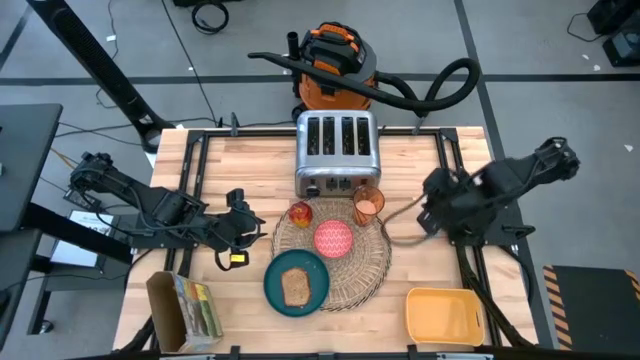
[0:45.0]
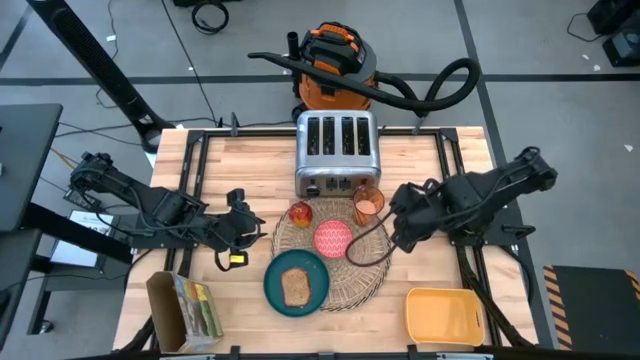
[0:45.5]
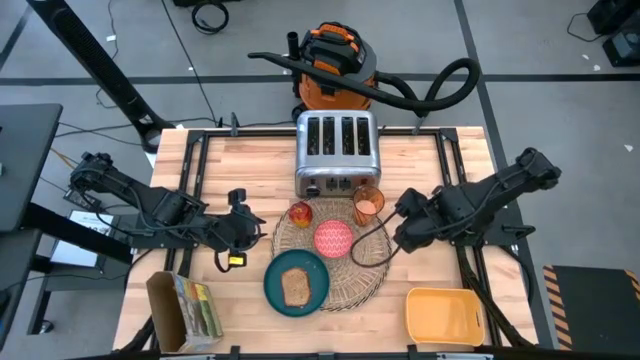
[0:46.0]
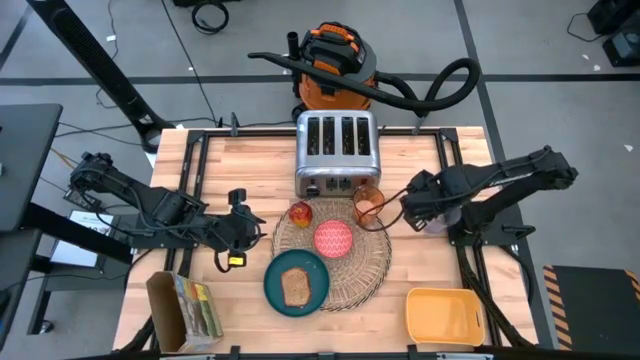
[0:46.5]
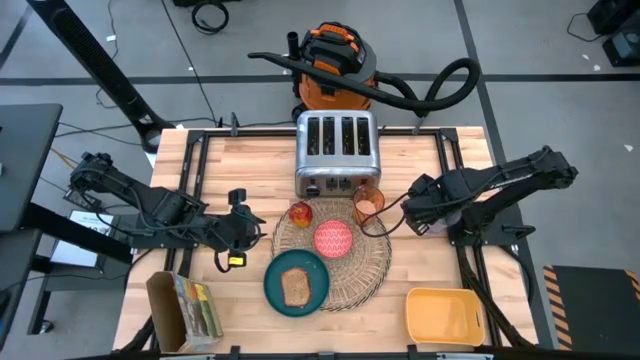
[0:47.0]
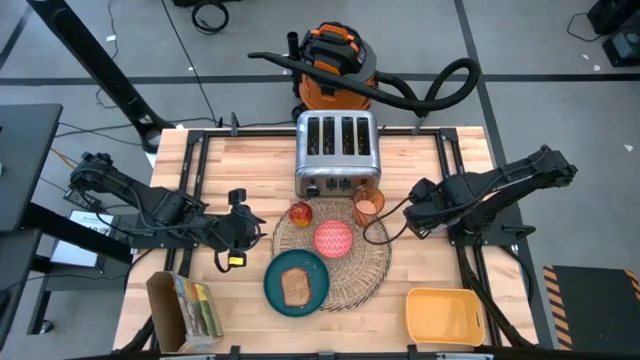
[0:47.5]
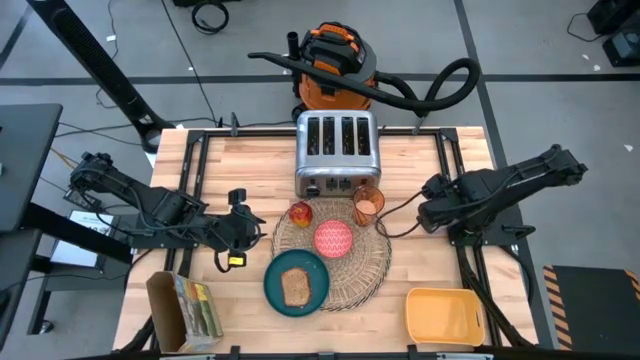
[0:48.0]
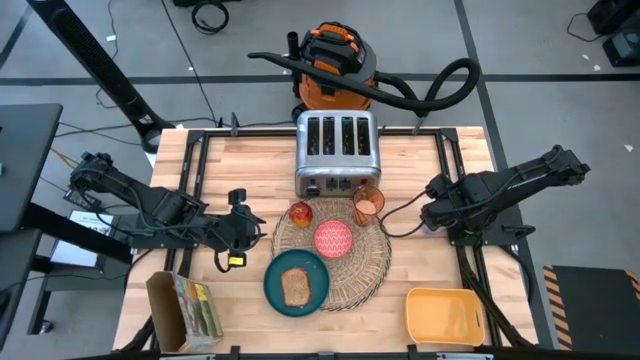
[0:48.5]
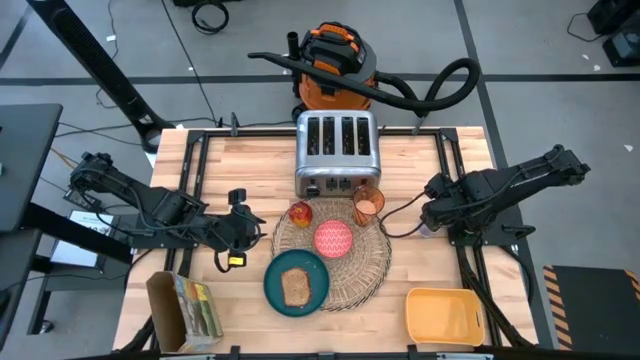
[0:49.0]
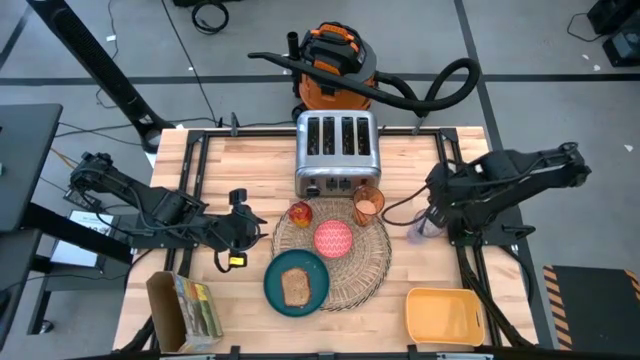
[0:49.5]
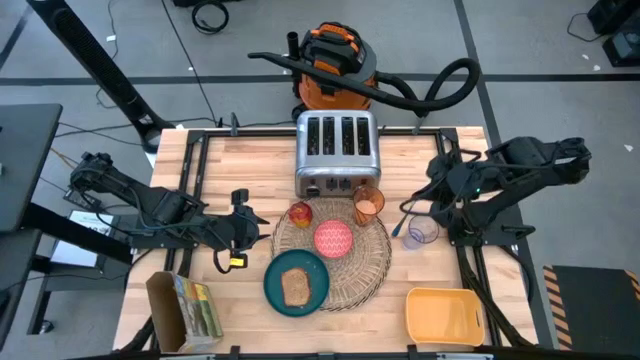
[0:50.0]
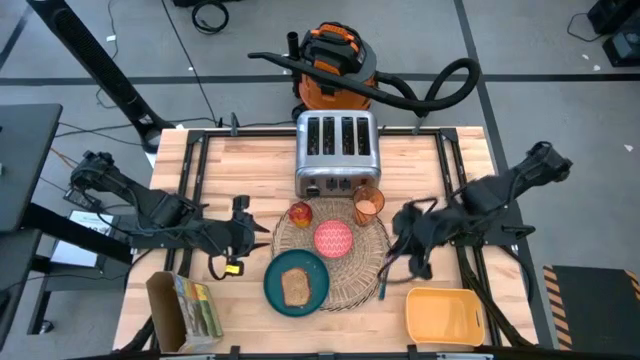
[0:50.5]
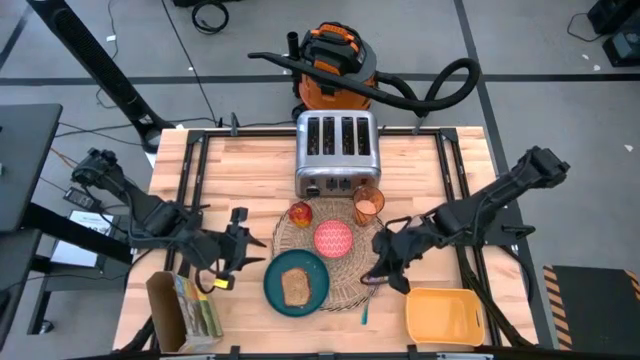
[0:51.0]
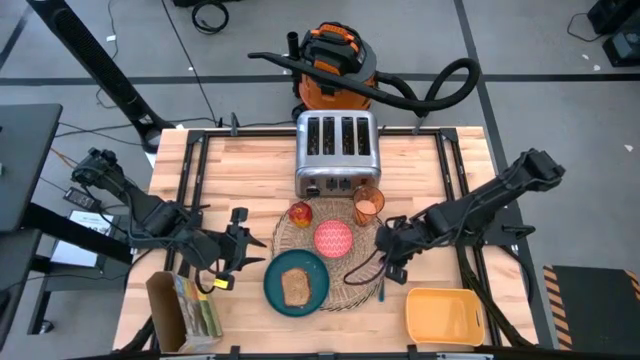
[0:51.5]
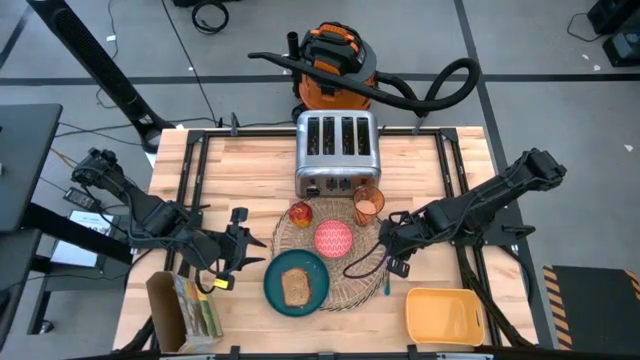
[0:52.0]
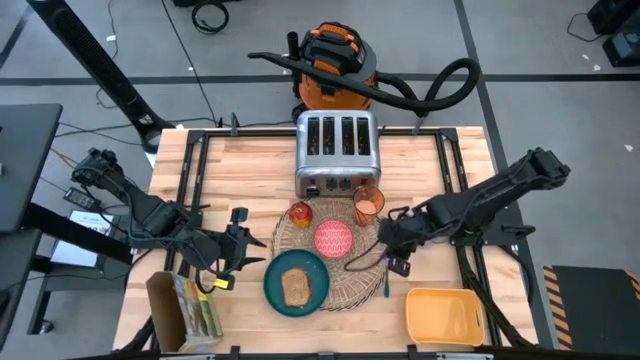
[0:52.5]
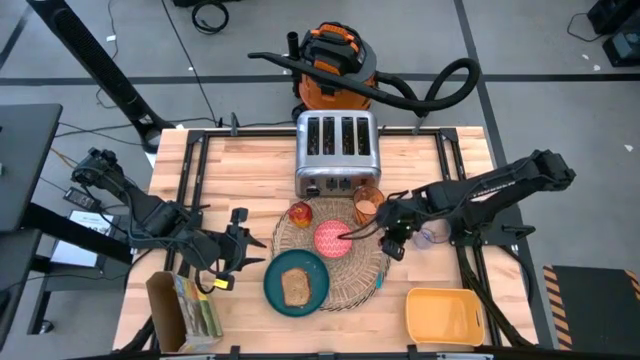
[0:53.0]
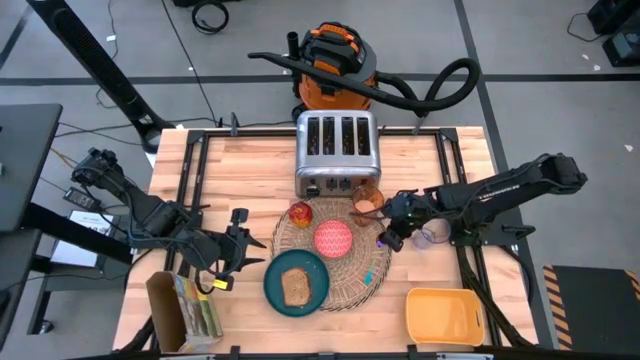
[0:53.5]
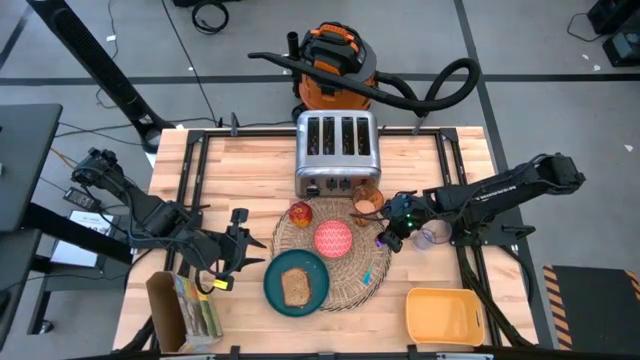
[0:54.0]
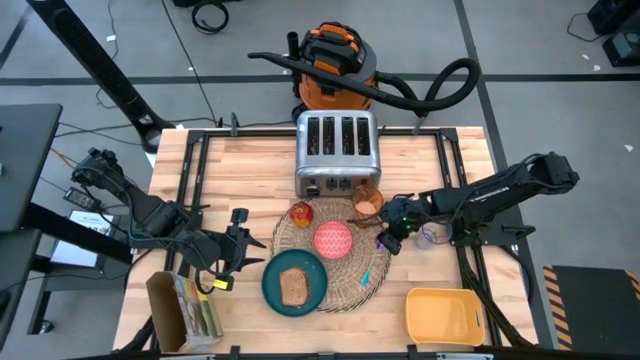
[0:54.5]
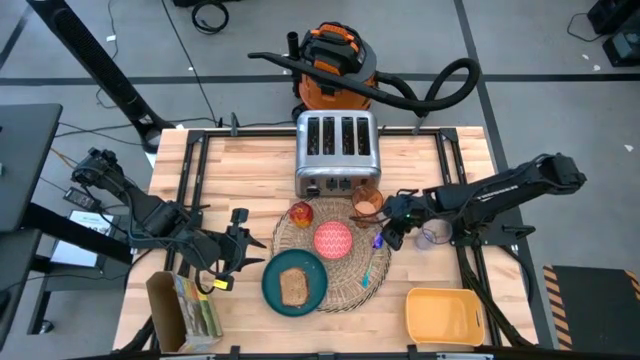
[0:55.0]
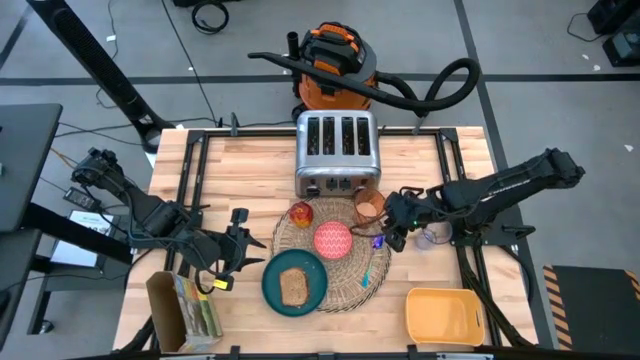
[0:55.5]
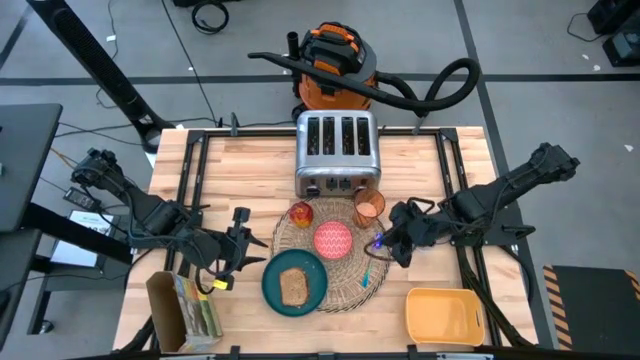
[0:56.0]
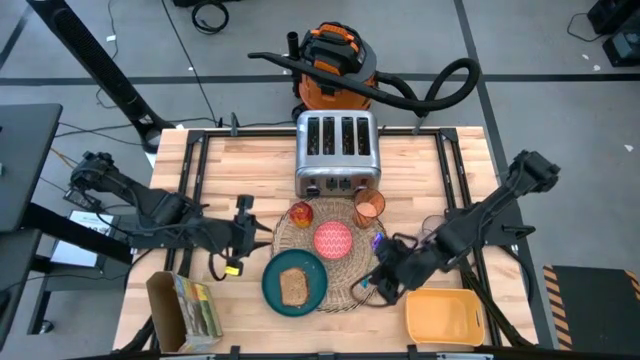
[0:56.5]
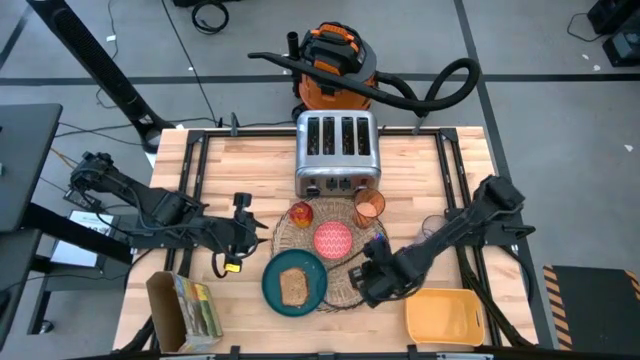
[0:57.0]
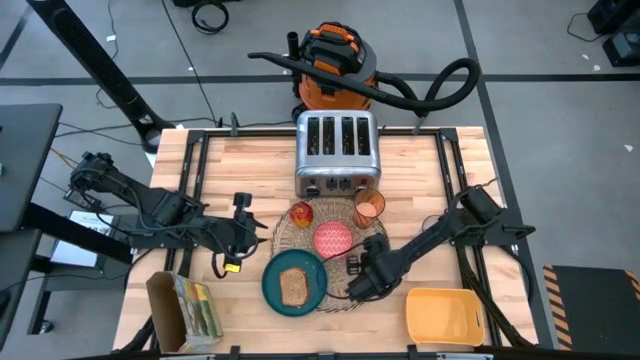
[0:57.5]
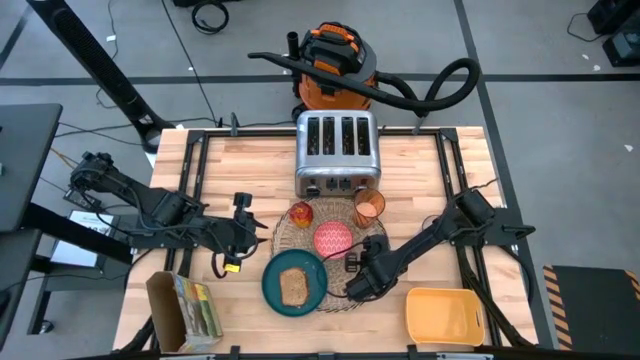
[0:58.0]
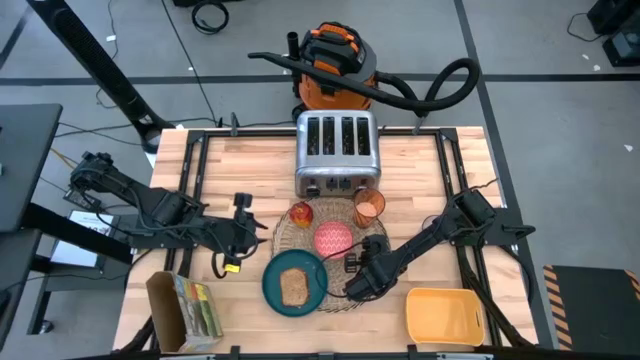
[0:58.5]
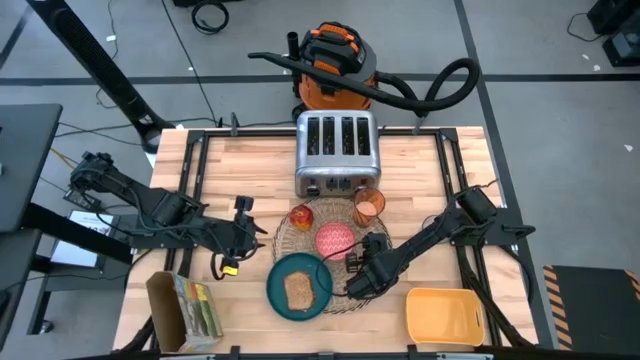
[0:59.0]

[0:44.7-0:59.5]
Task: Arrange a breakfast setting
Put the blue spoon on the brown placemat to the right of the red patterned bowl

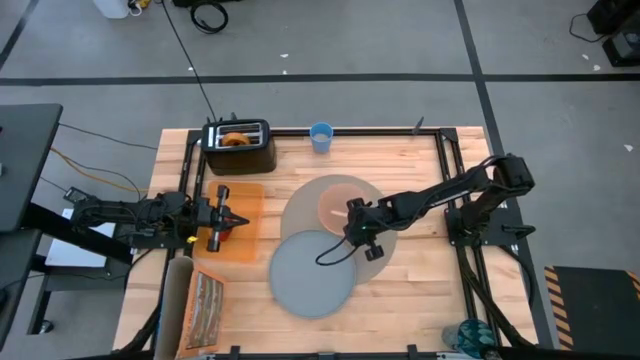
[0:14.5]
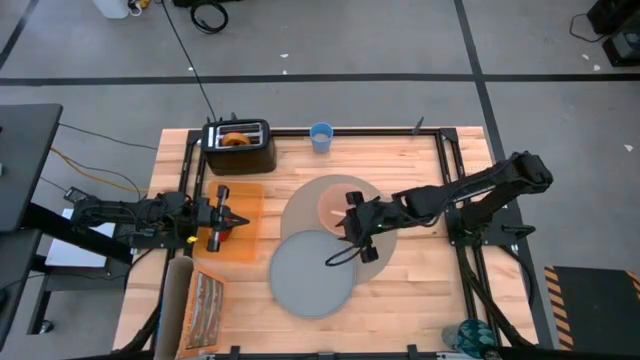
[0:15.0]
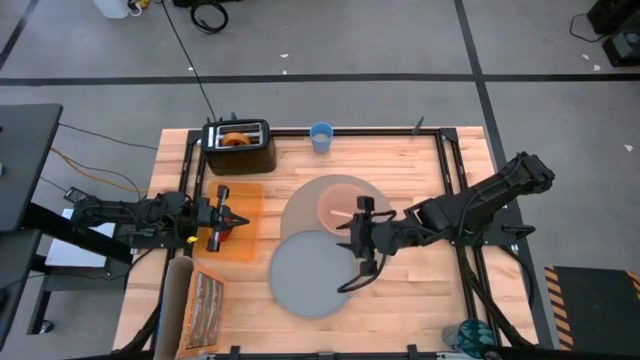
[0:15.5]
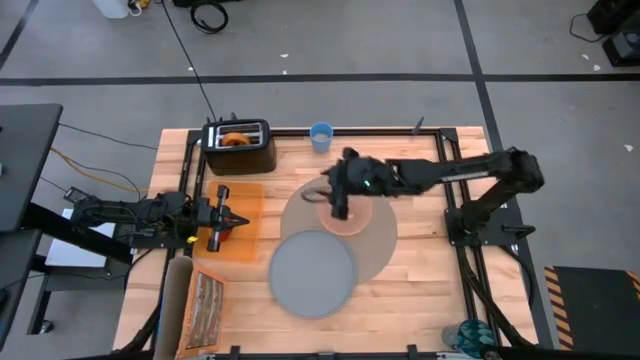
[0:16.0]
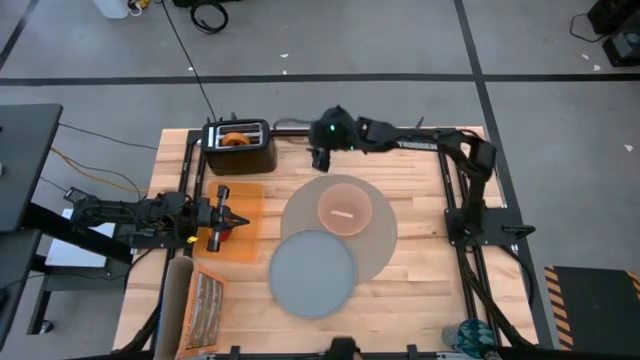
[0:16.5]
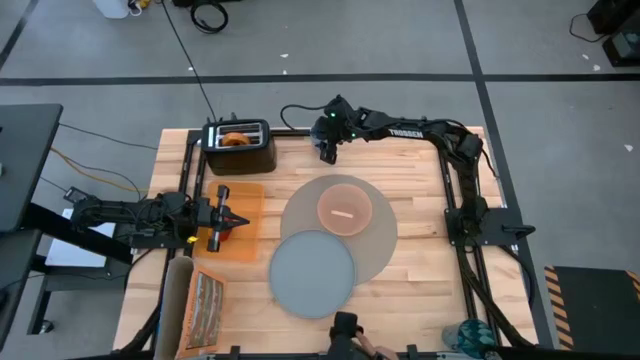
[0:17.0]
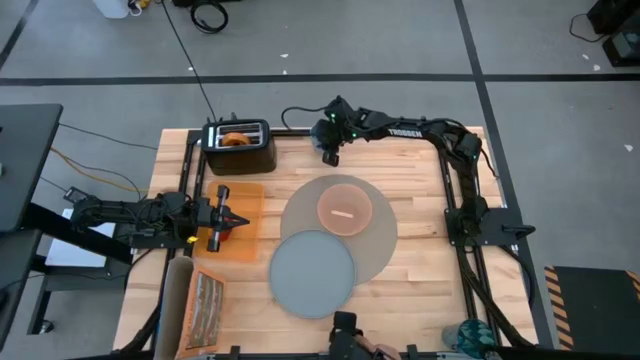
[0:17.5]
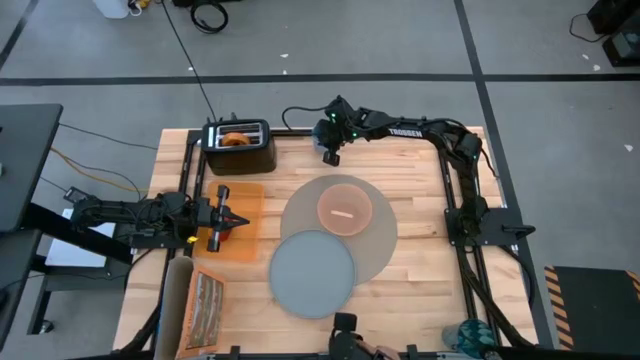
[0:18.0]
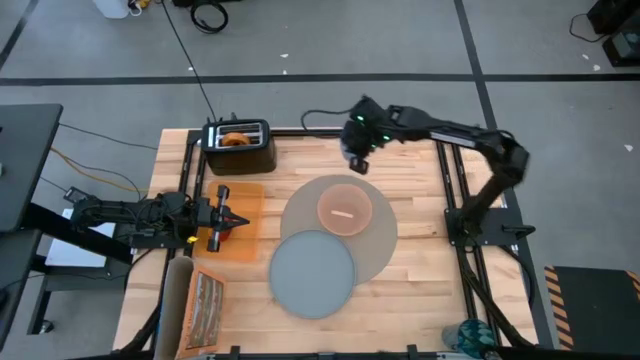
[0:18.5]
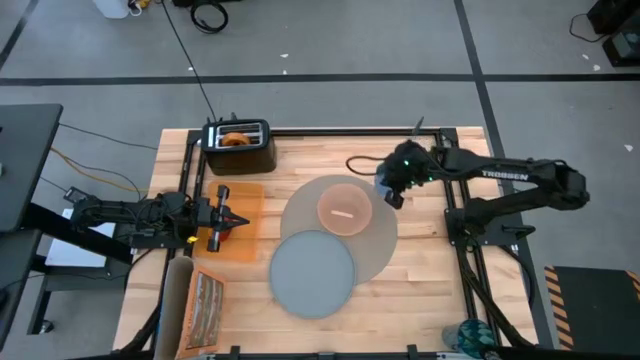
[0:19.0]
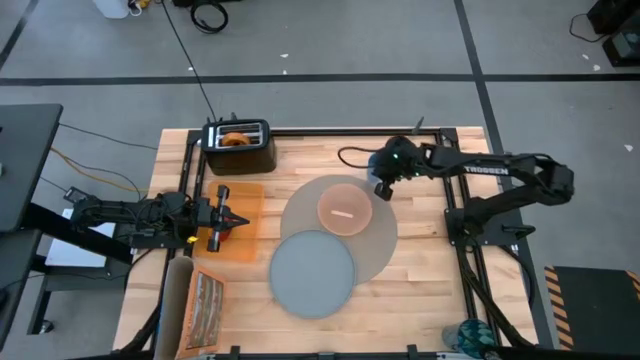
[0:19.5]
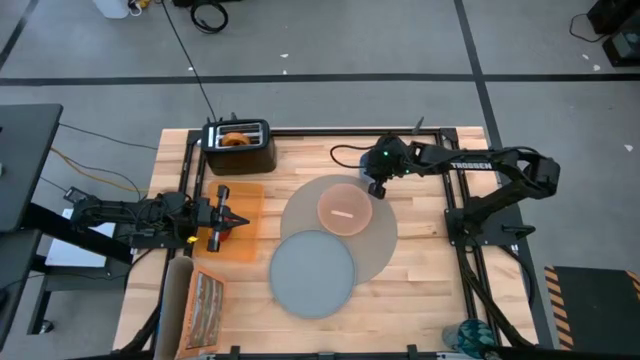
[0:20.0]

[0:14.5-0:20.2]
Task: Arrange a breakfast setting
Put the blue cup next to the table mat
